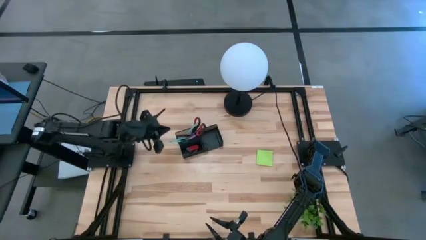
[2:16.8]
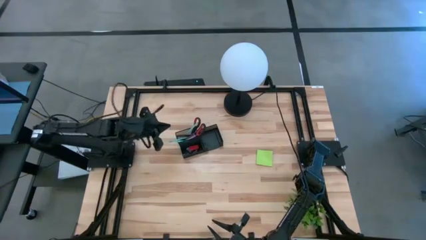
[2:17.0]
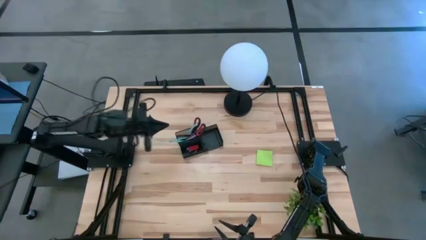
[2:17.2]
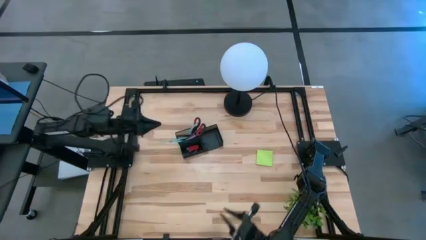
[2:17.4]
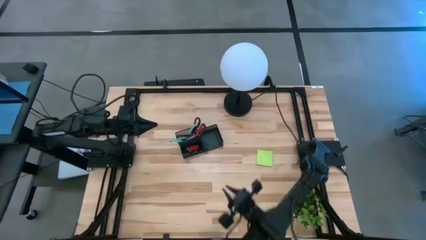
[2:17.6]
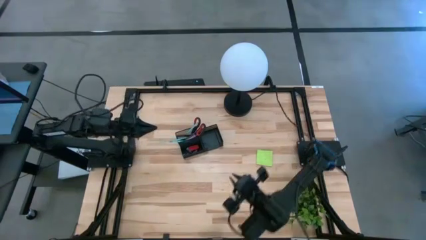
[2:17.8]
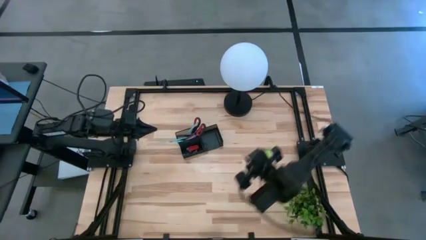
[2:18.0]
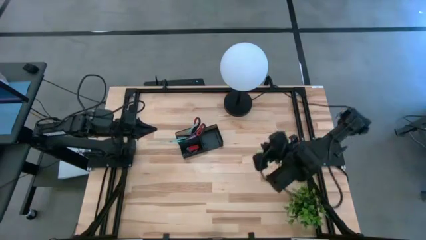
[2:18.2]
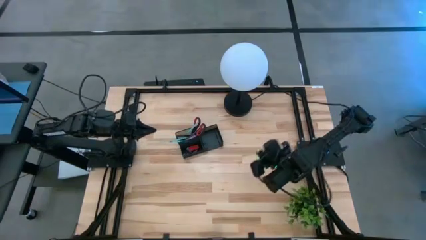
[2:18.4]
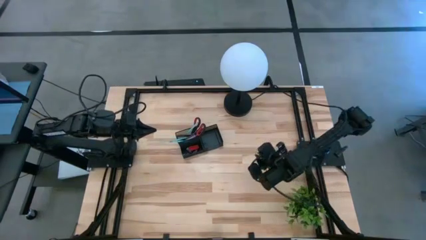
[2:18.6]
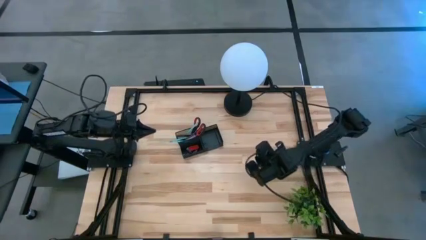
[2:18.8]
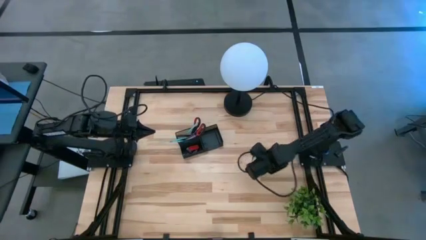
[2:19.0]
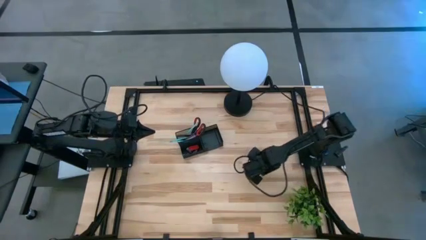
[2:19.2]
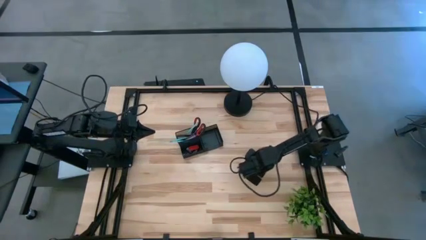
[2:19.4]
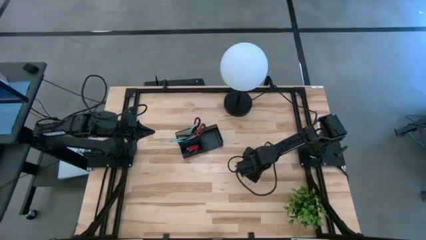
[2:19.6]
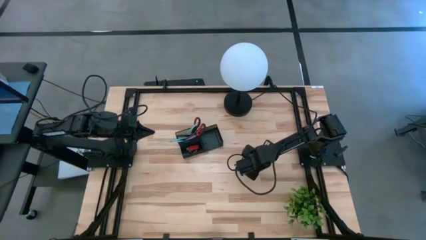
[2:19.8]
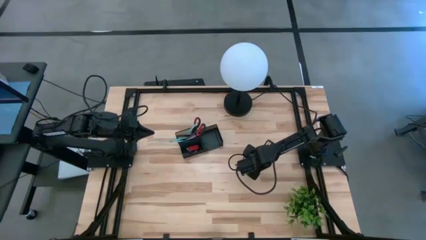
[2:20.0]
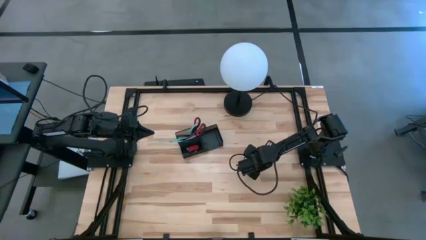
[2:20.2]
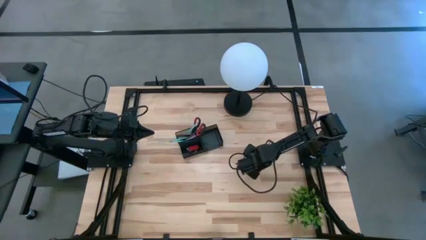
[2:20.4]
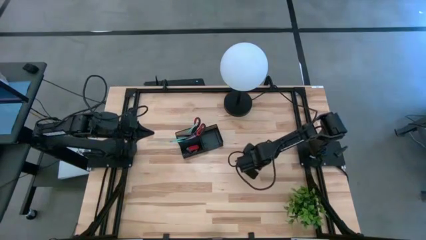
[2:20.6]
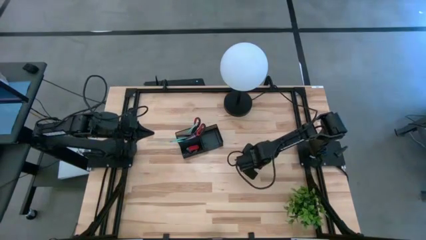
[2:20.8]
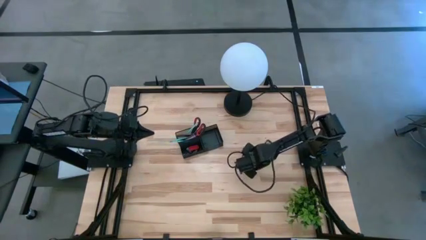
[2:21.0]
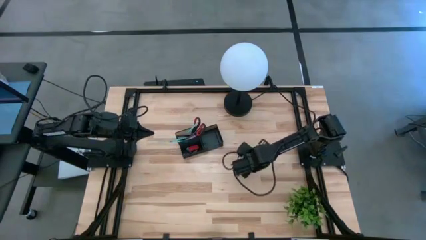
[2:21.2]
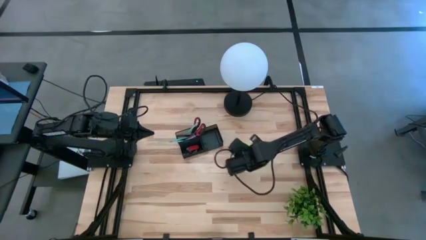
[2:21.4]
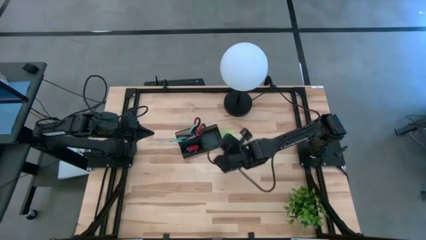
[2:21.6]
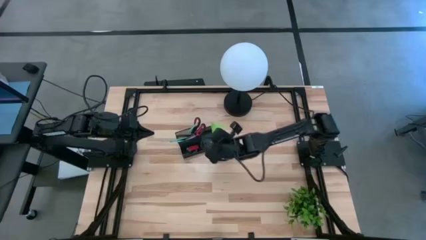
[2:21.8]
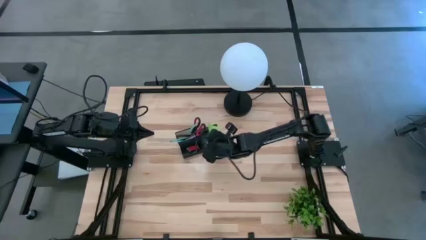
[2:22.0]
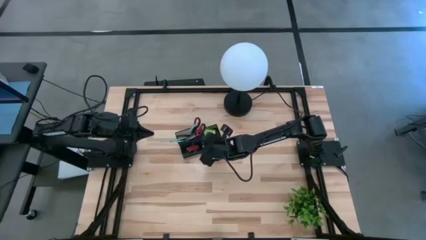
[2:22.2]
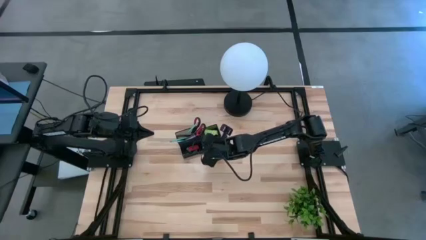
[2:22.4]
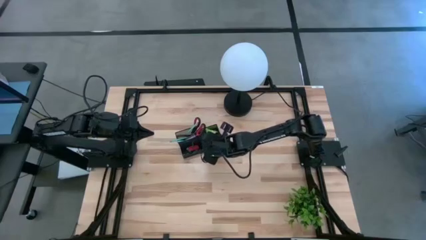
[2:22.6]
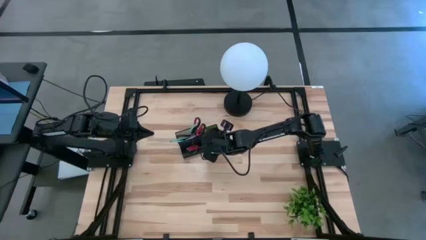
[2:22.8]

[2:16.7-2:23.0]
Task: Pick and place office supplies into organizer
Put the green sticky note into the black desk organizer

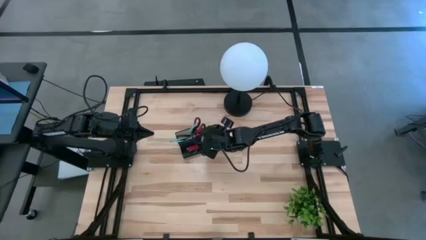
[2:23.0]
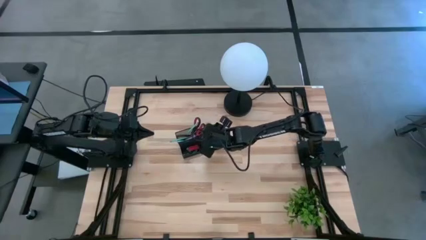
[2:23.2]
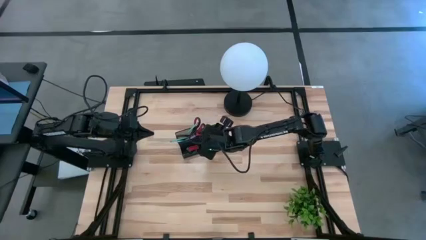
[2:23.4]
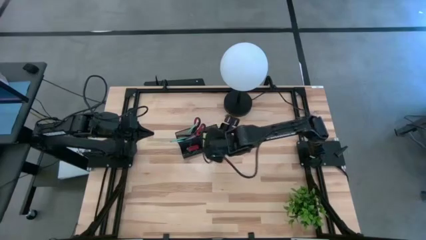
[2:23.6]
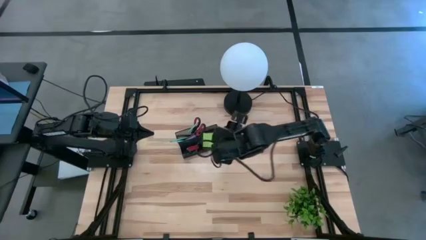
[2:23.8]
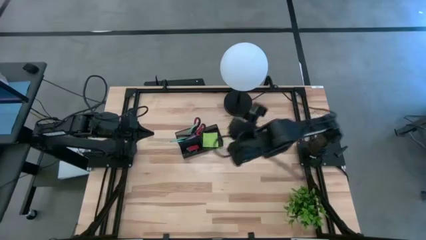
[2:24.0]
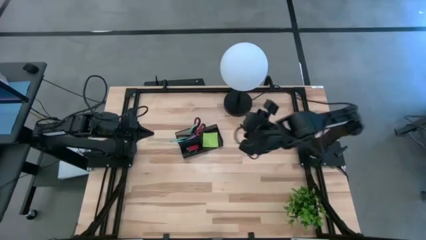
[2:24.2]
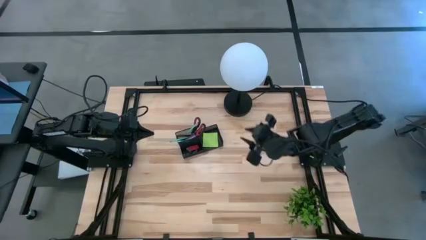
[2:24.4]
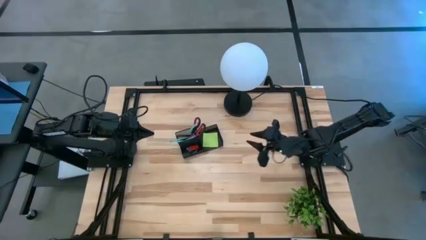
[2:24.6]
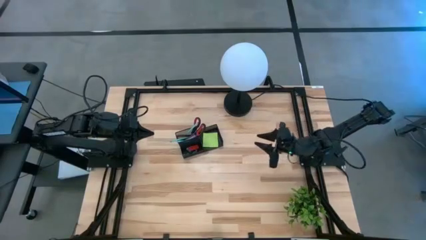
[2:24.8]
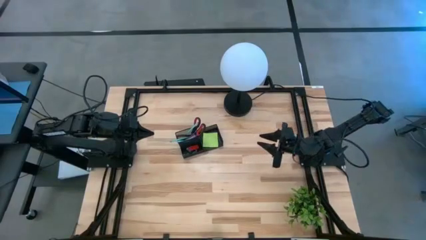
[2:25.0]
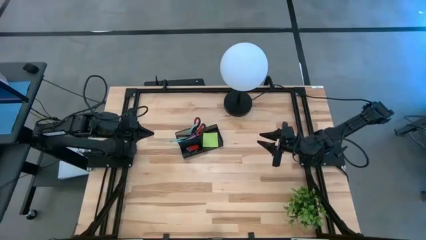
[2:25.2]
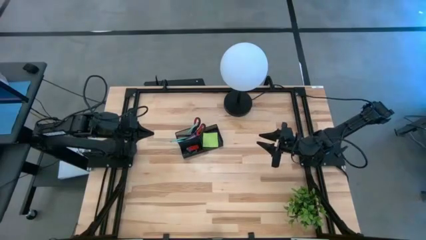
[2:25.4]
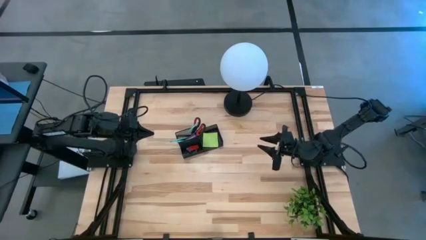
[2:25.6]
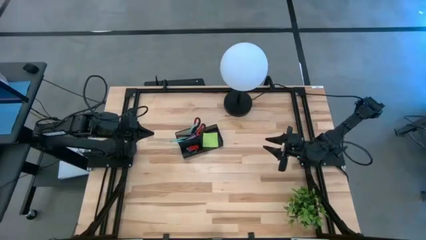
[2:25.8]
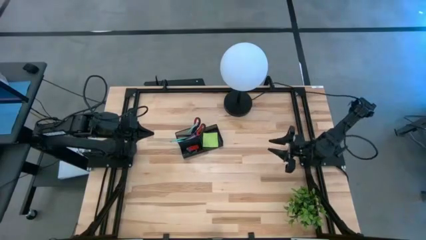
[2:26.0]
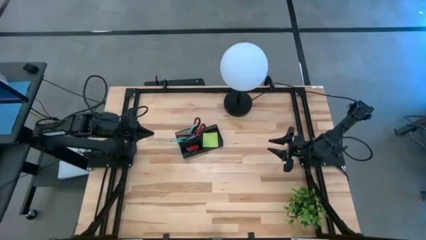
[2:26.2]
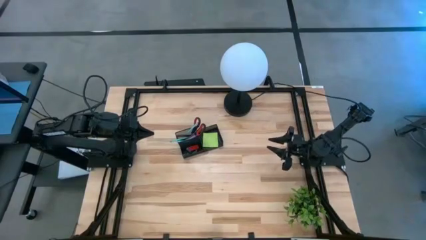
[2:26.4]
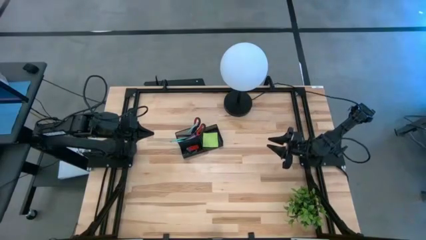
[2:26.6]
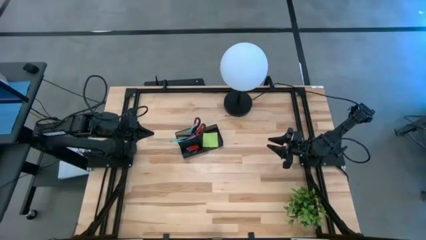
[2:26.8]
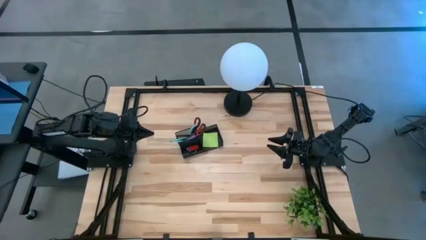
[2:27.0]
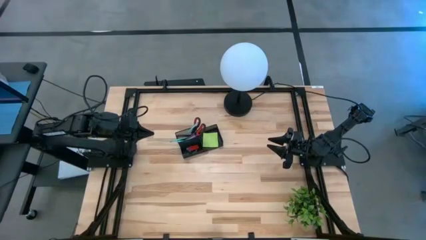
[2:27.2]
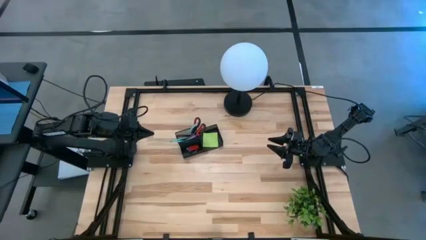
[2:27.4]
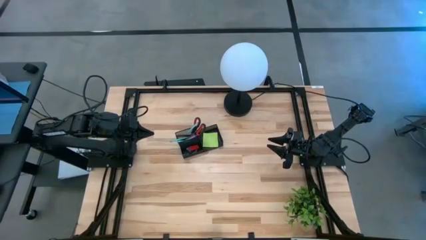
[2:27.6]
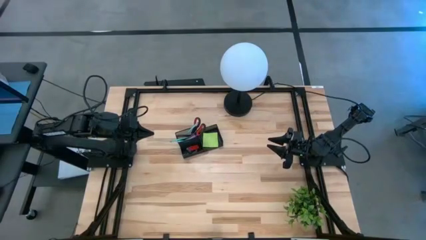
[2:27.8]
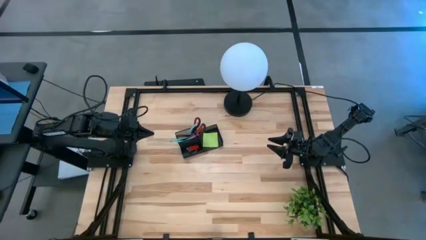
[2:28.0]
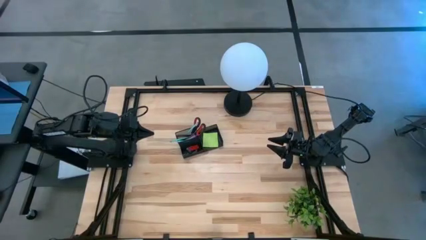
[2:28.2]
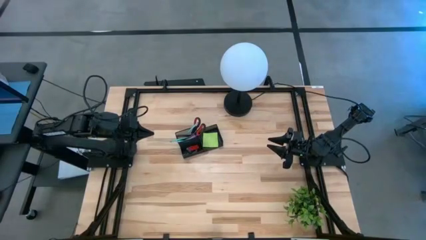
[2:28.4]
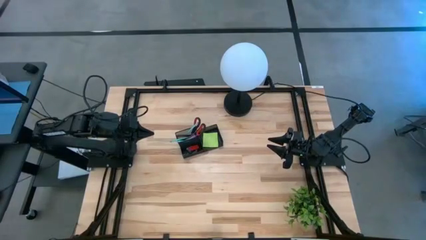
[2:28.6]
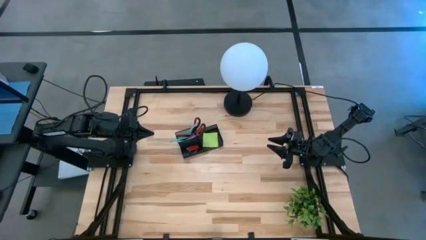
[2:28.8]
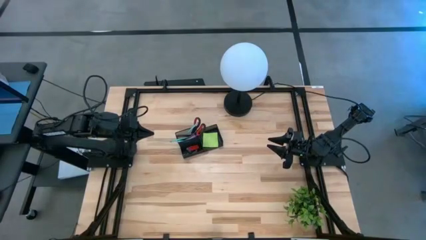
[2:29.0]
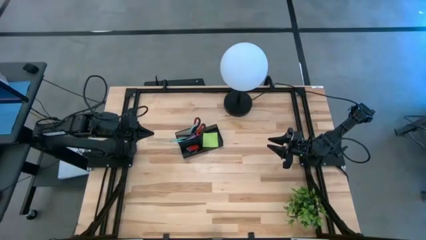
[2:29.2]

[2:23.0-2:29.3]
Return to Home Position

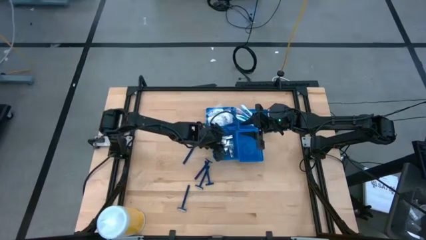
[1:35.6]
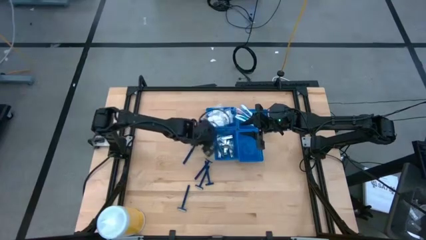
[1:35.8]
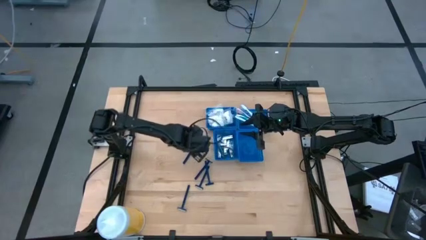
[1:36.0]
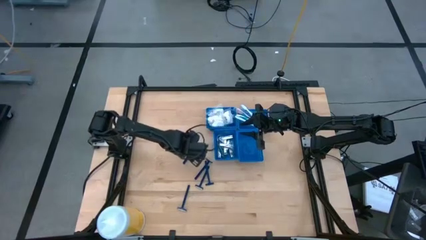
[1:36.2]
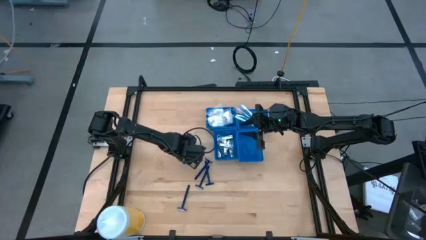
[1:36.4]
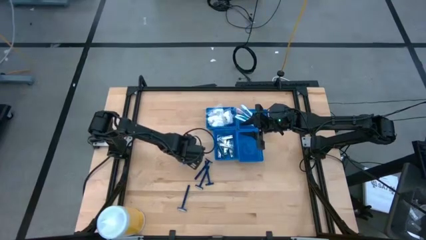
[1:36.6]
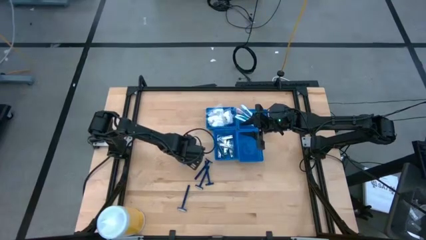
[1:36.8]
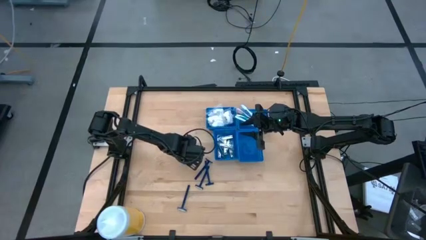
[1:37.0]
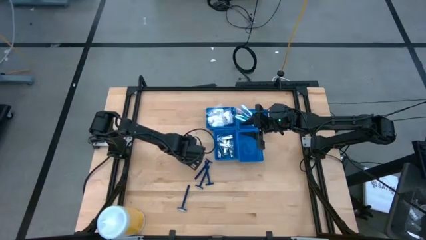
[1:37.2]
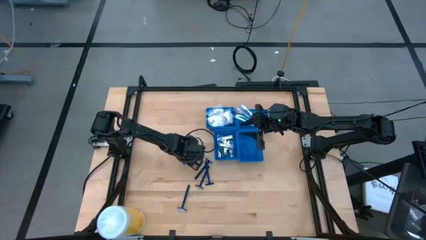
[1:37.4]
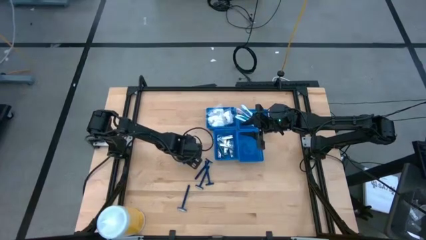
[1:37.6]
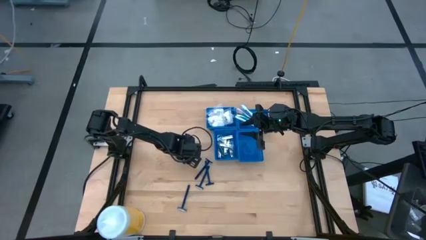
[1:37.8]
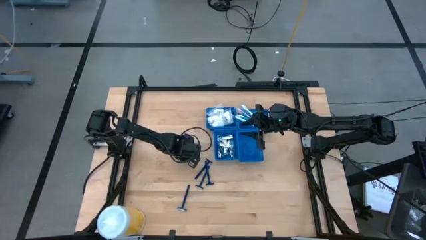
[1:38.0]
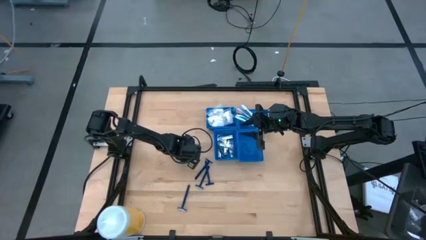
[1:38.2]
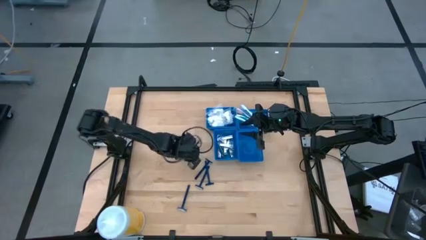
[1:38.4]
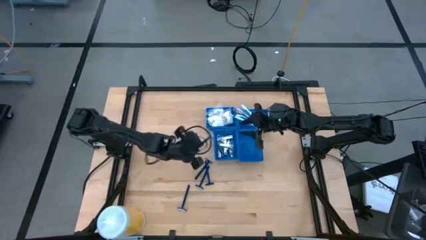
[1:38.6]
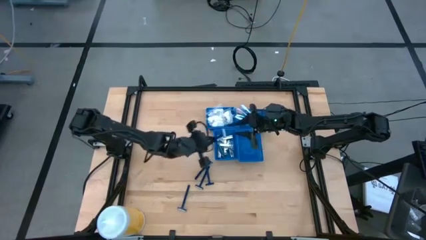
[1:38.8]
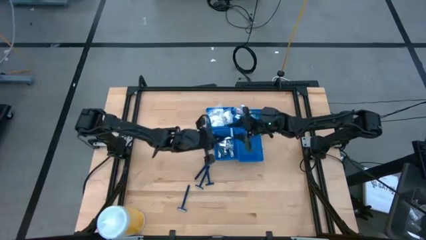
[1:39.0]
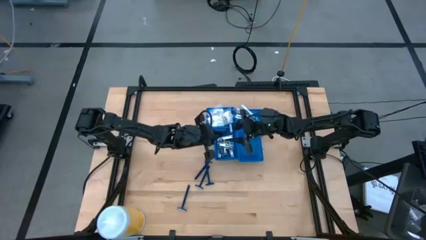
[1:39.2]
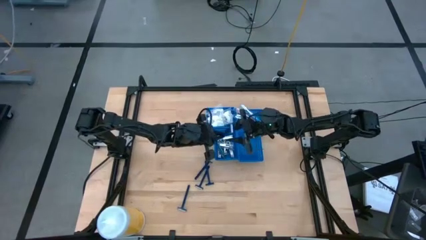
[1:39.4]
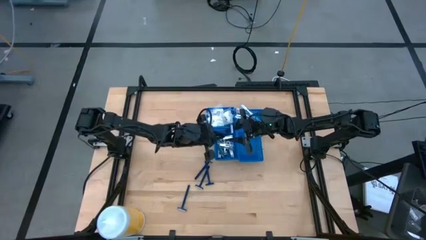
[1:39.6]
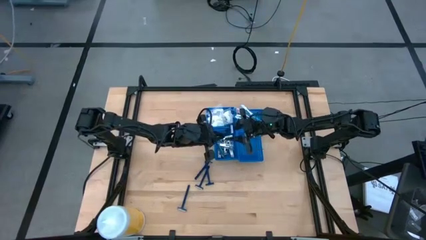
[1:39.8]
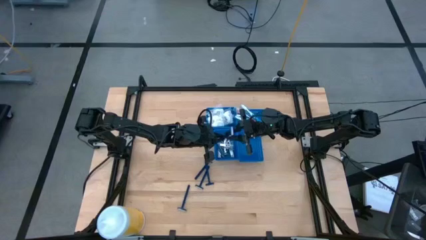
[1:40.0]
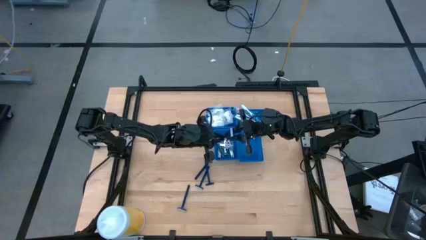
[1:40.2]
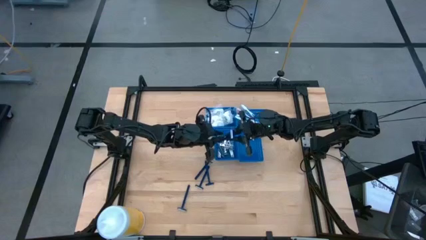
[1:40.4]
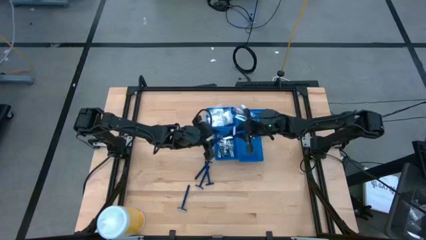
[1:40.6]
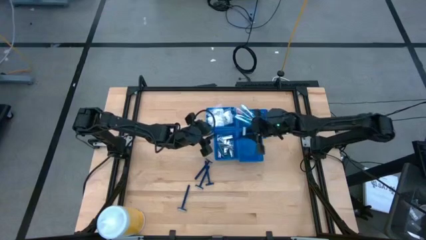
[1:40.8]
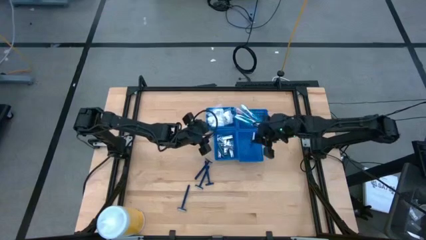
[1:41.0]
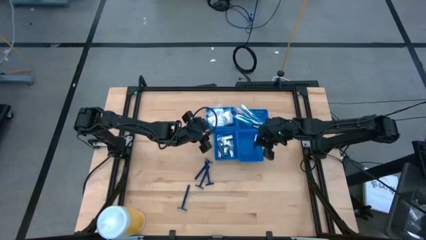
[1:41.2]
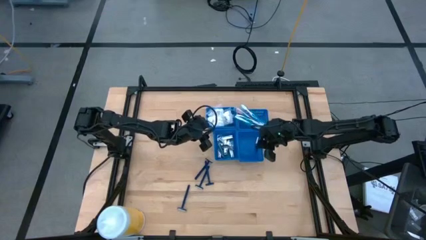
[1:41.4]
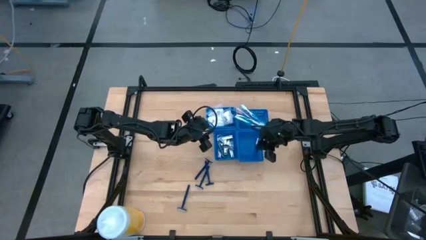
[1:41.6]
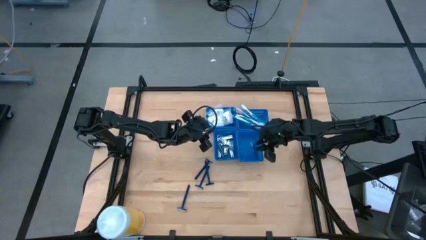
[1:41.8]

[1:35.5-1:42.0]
Task: Pick & Place Travel size toiletries
Put the blue razor into the bottom right blue basket
